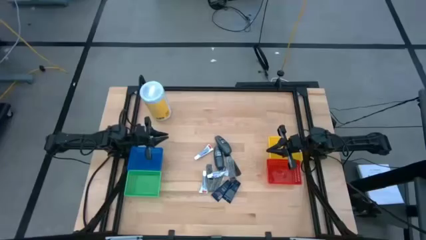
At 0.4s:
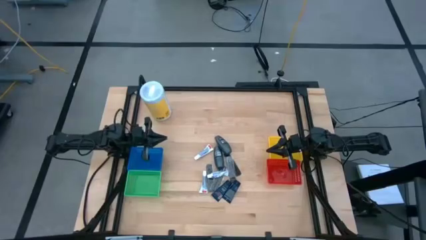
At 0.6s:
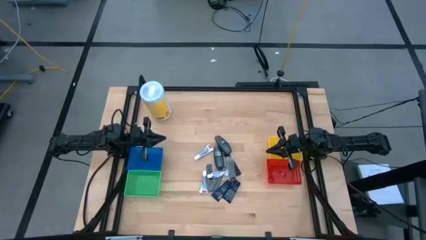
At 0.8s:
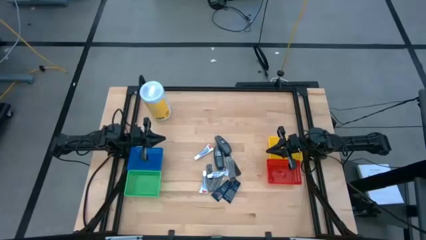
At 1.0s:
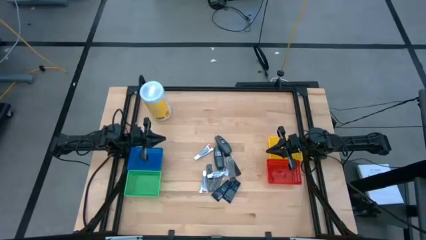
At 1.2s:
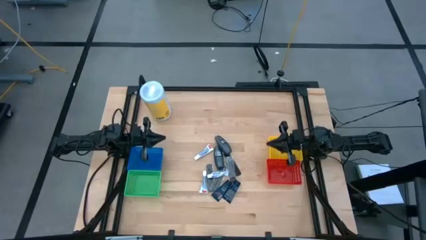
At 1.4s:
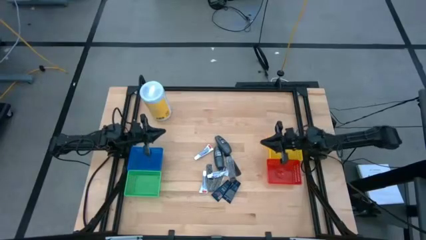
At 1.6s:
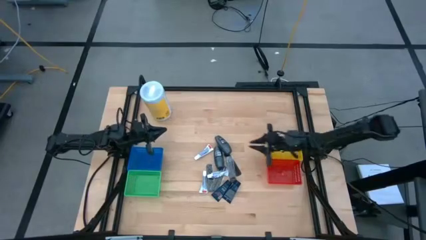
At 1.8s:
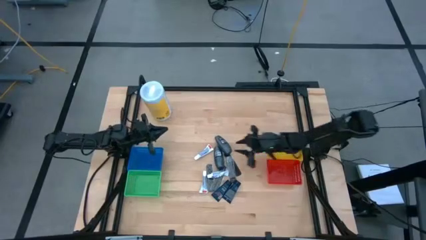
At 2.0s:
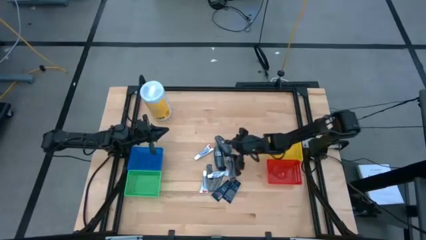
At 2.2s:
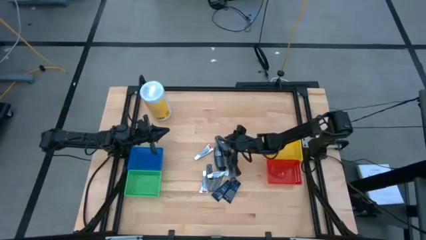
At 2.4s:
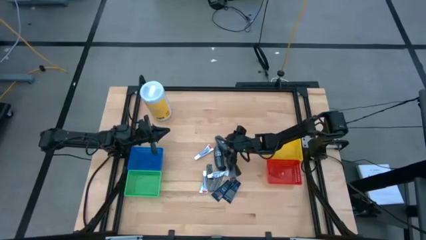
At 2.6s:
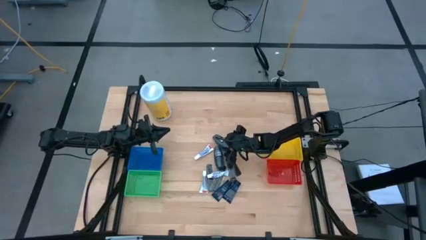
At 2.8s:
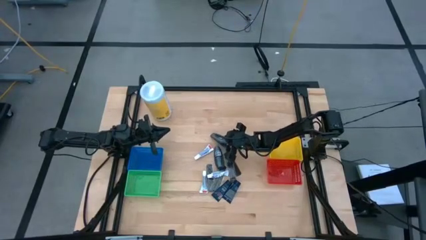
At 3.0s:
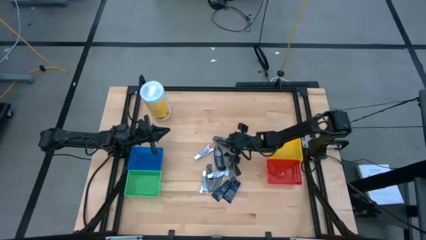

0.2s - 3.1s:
Task: Pick & Place Travel size toiletries
Put the black deodorant into the yellow basket

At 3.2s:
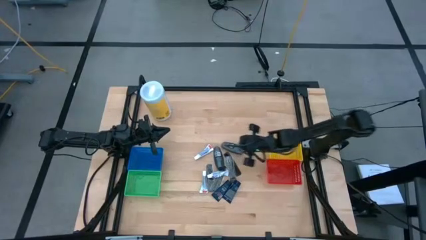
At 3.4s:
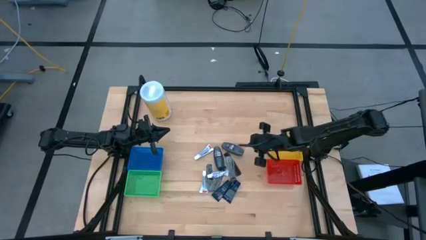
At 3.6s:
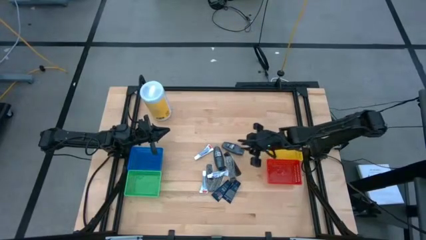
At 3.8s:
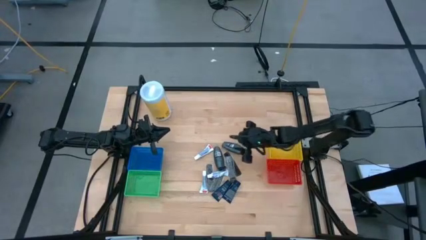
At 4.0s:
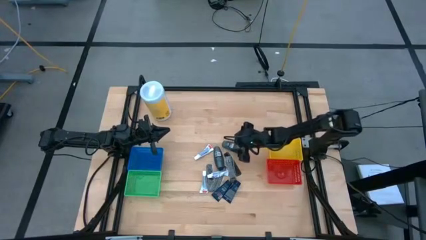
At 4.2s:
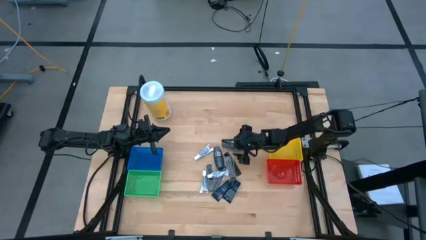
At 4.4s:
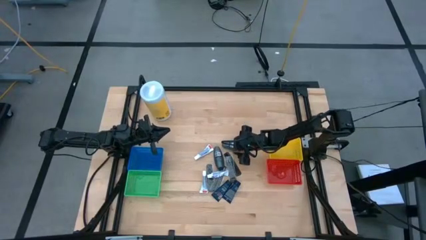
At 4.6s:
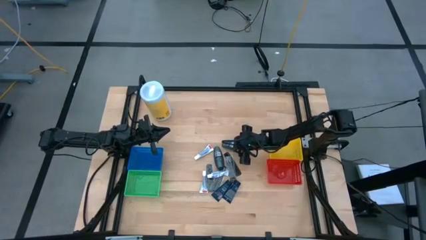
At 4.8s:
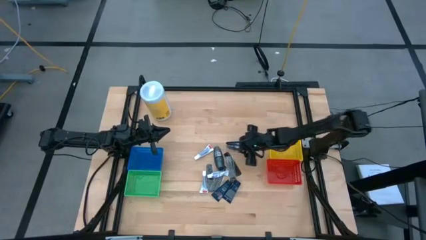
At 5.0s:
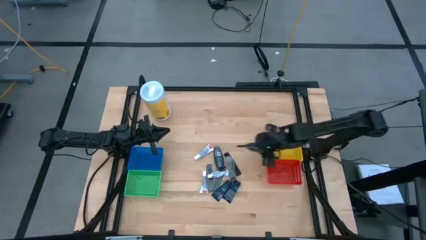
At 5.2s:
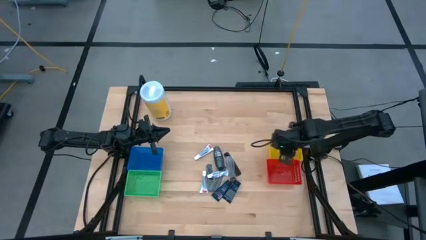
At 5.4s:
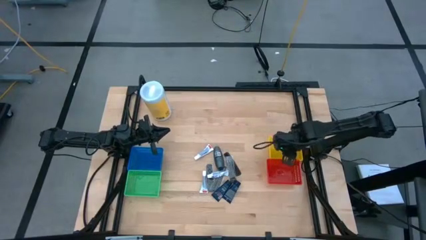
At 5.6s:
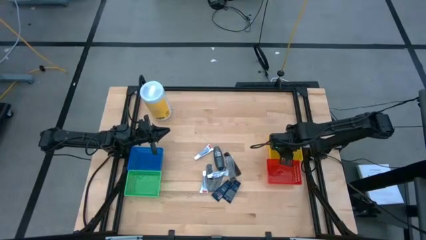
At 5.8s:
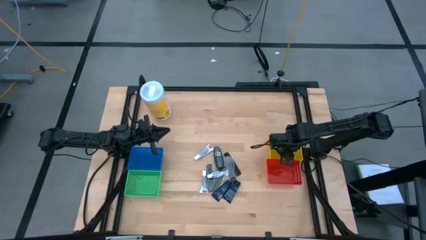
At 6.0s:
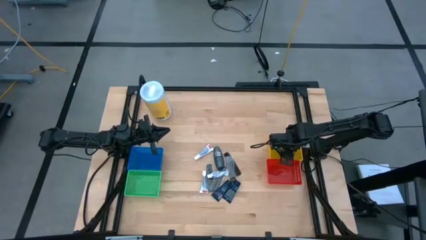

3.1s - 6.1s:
Put the black deodorant into the yellow basket

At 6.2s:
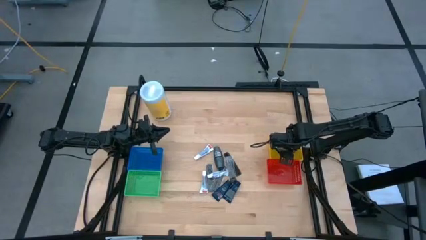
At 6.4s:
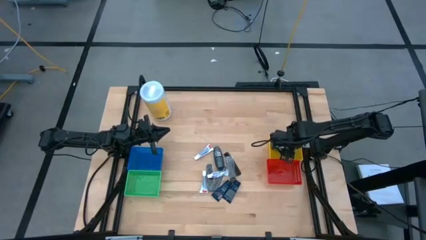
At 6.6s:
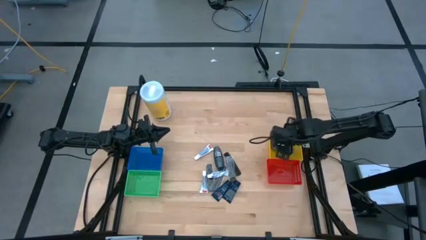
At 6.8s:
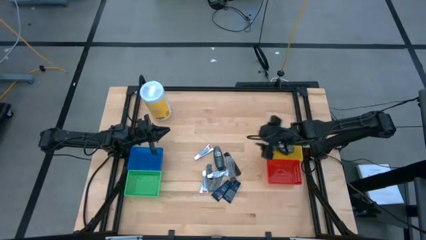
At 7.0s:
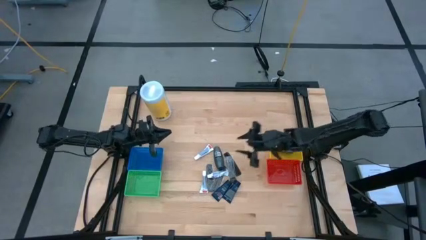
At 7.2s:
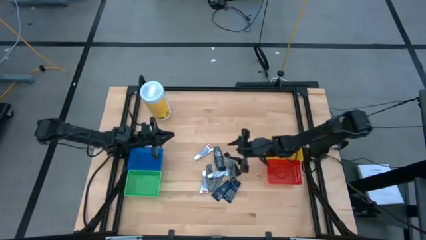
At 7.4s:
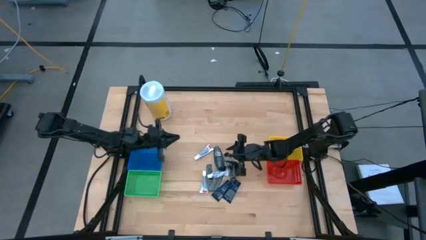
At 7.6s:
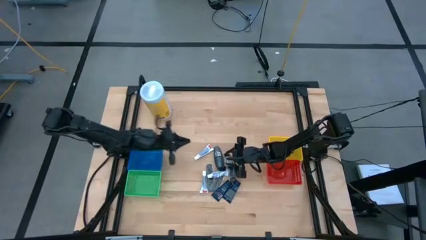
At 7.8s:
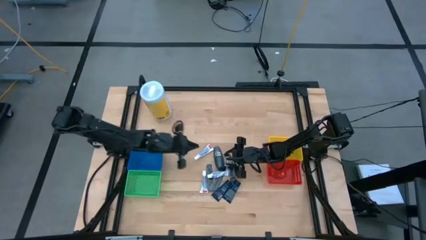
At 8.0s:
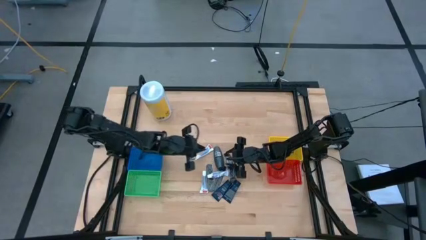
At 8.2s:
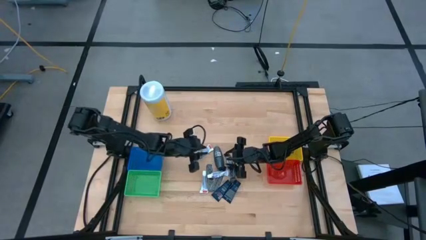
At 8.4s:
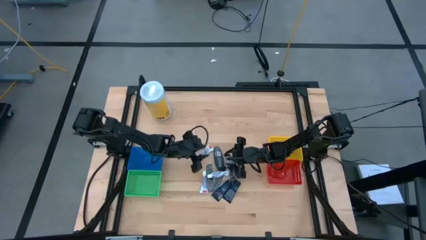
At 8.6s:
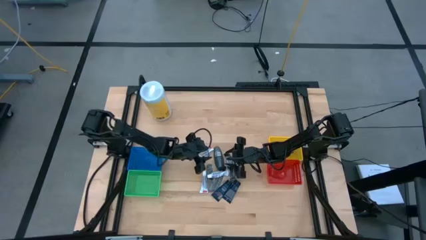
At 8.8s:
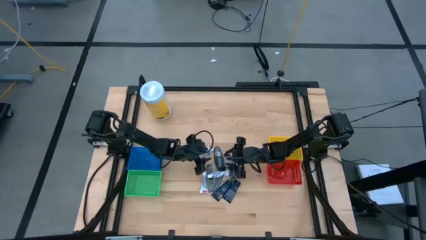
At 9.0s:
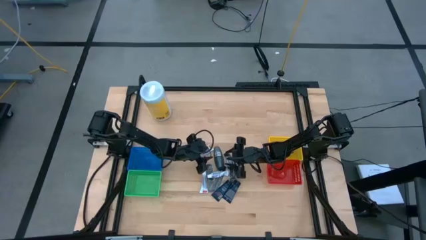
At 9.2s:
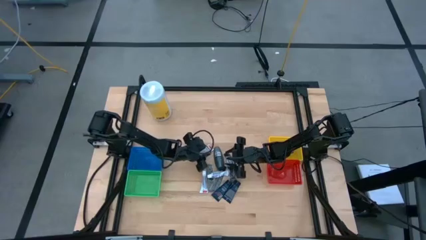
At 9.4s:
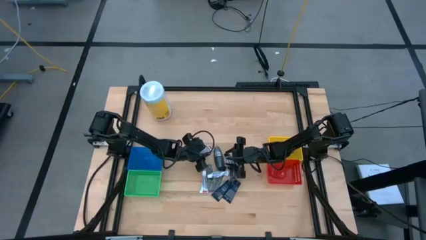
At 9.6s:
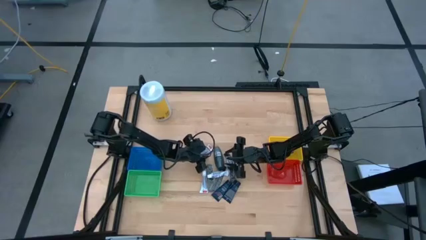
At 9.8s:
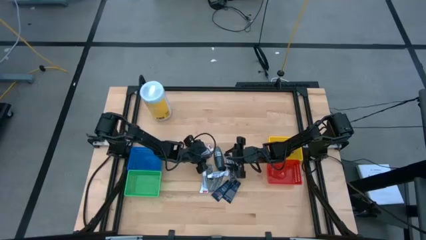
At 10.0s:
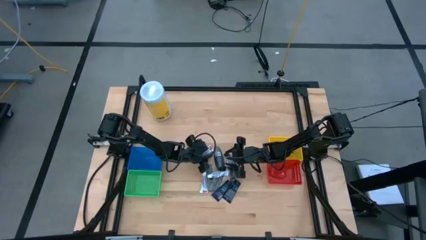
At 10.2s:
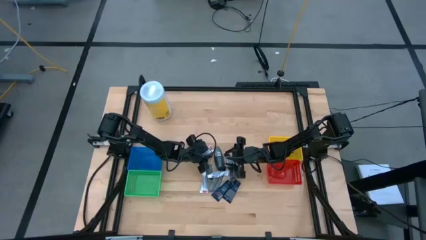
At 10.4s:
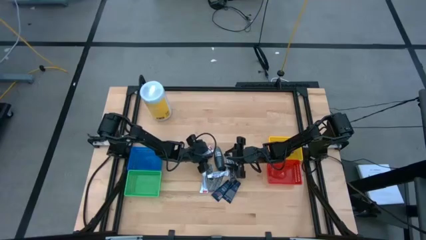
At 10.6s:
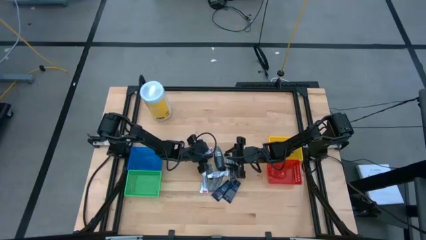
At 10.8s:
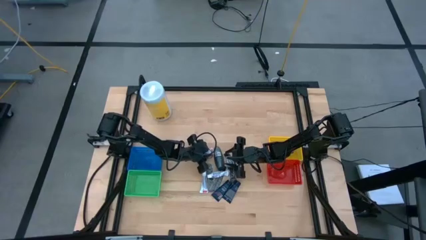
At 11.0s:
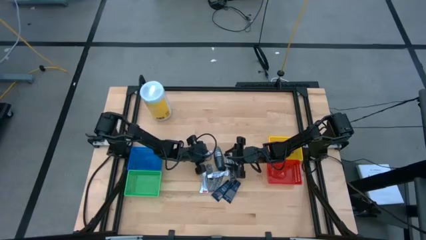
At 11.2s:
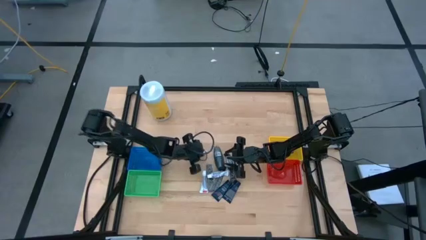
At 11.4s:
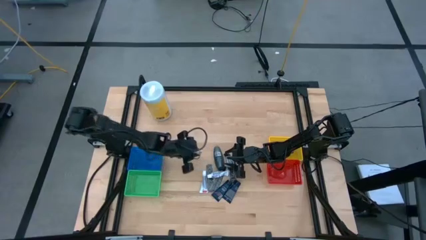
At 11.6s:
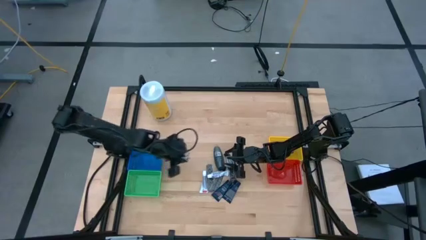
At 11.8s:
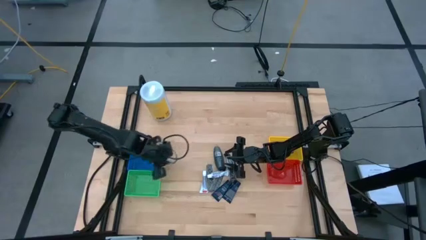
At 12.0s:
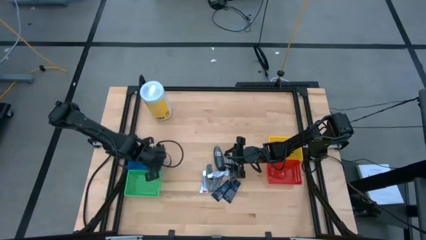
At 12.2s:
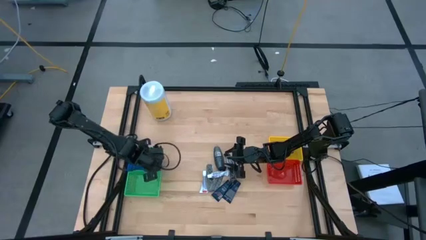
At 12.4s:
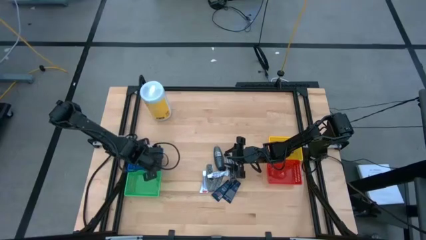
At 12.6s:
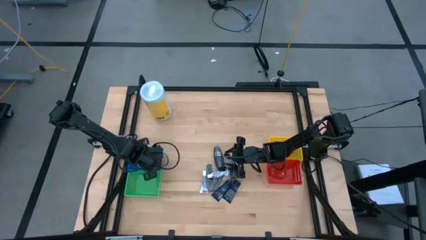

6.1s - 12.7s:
Put the white toothpaste into the blue basket

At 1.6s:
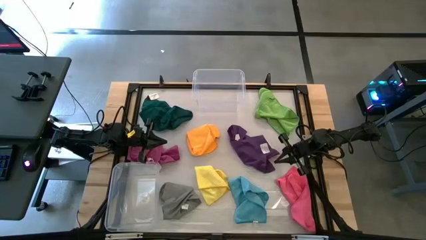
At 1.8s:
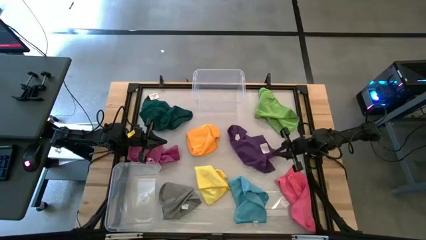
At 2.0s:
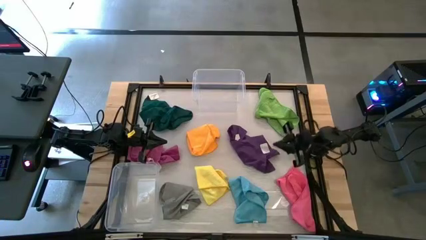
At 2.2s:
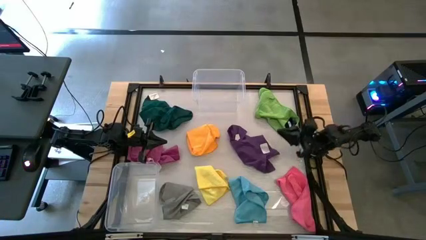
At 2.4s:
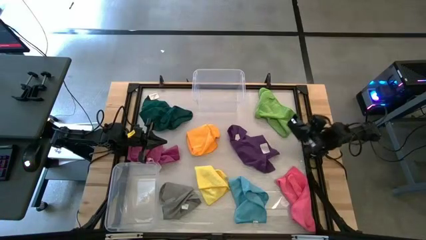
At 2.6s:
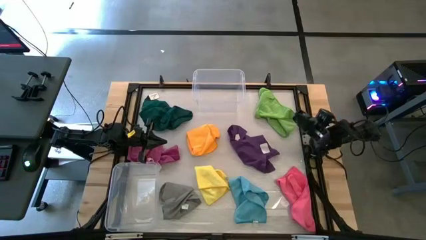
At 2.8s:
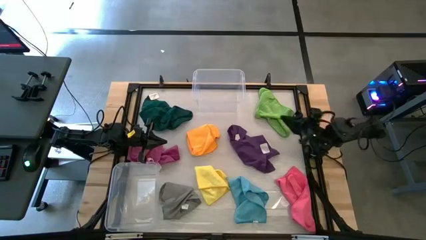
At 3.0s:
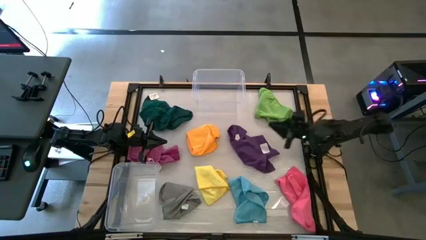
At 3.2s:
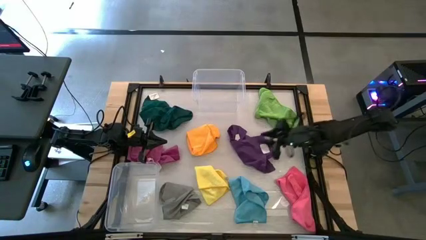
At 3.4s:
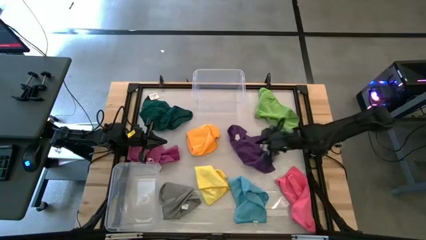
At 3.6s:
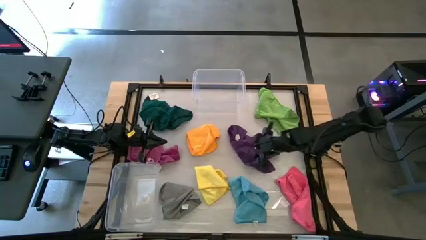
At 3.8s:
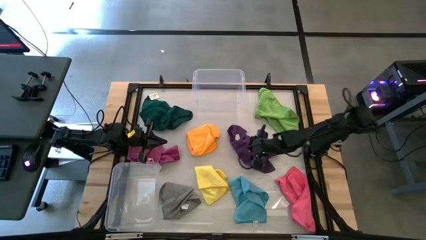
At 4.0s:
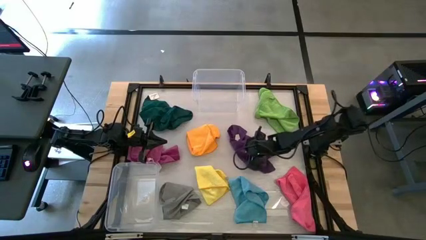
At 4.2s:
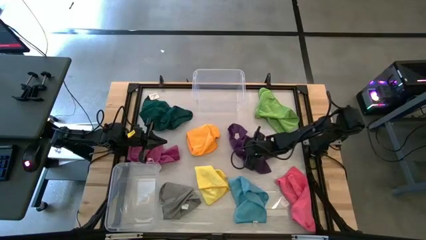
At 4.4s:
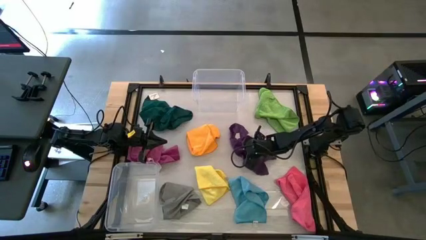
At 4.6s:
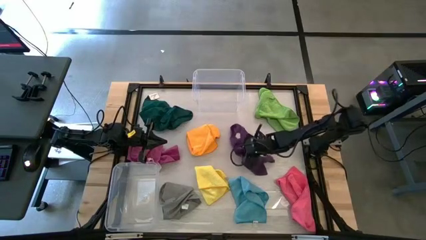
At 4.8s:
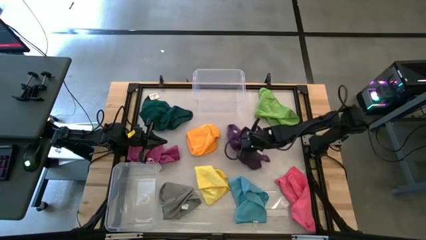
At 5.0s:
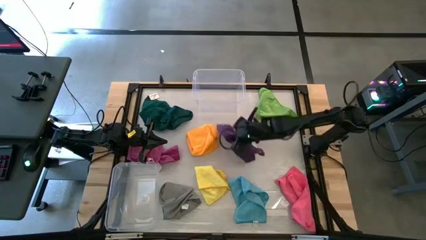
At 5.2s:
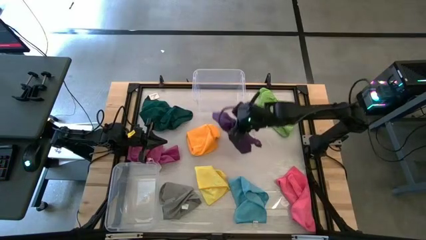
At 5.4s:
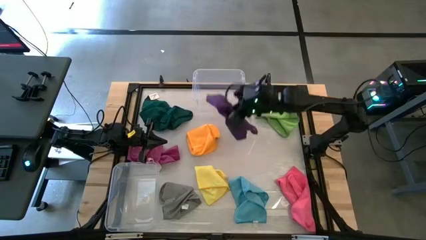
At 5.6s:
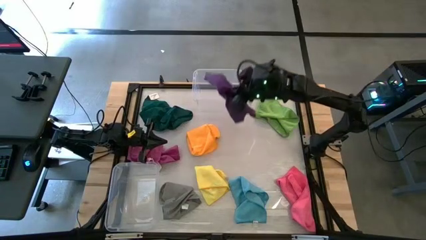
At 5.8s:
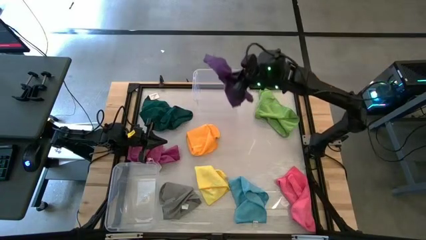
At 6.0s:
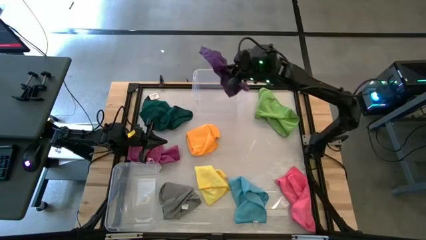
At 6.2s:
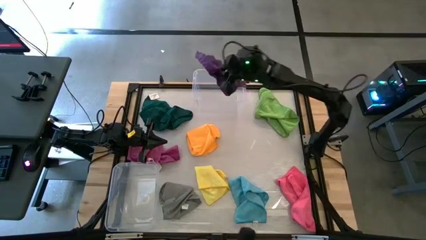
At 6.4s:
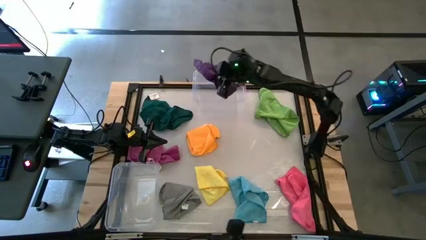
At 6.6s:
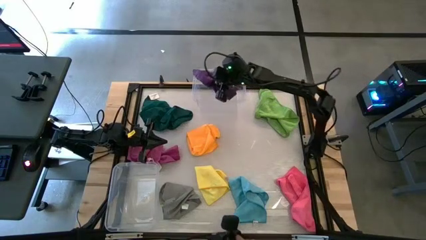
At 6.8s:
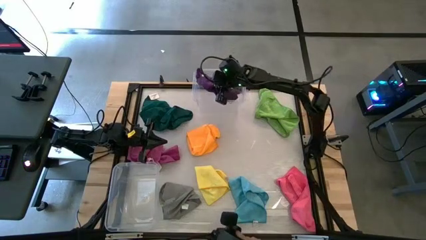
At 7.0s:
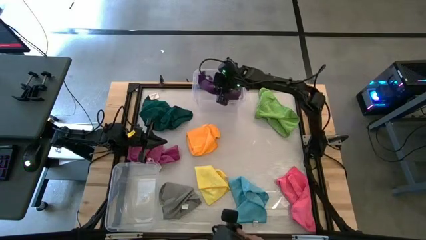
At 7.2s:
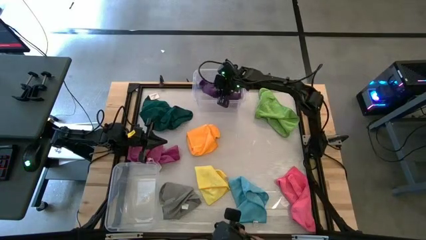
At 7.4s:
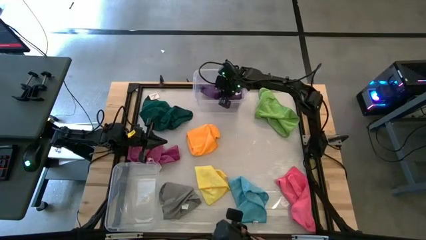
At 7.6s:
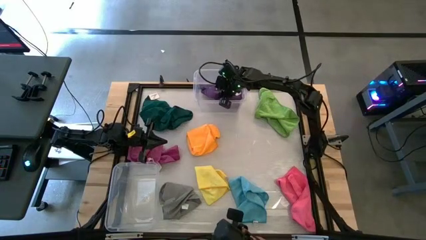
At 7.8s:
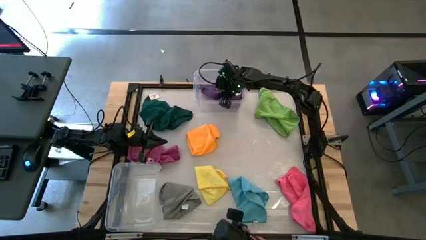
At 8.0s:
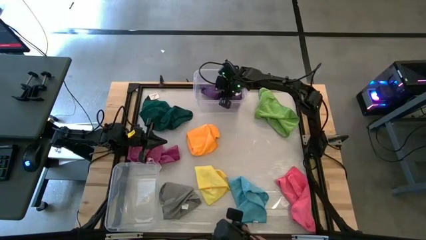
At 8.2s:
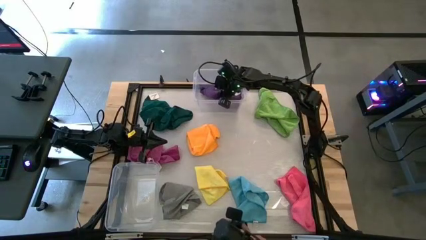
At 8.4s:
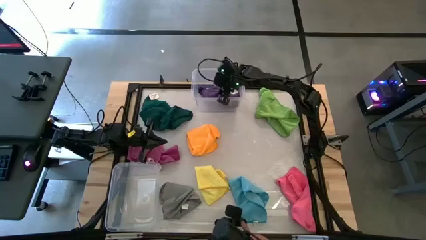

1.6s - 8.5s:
Task: Sort towels by color in basket
Put the purple kitchen towel into the top transparent bin
